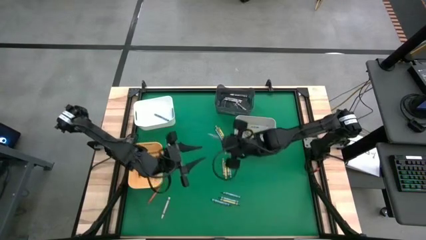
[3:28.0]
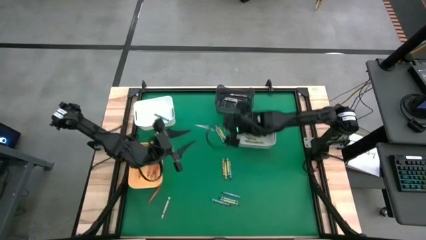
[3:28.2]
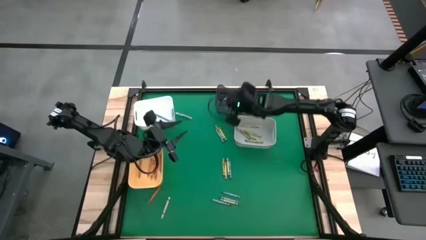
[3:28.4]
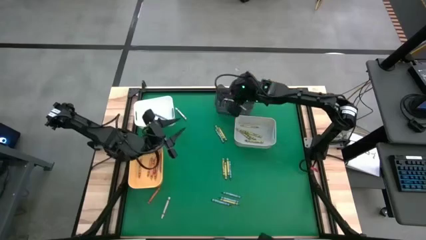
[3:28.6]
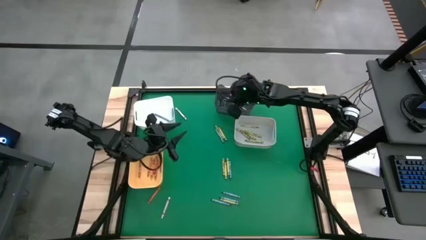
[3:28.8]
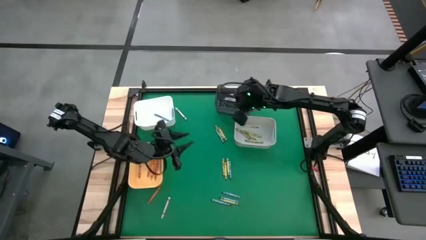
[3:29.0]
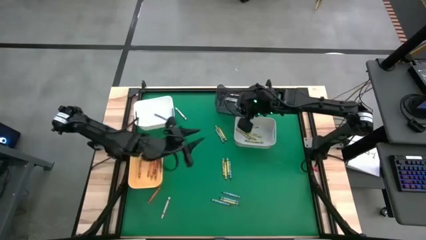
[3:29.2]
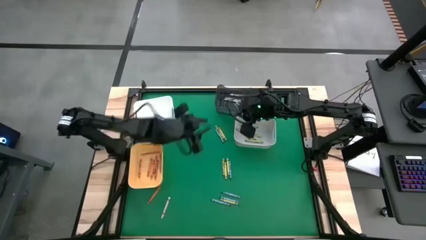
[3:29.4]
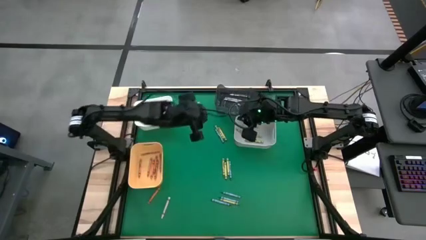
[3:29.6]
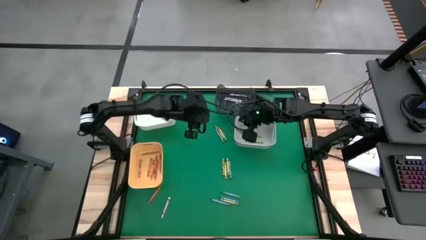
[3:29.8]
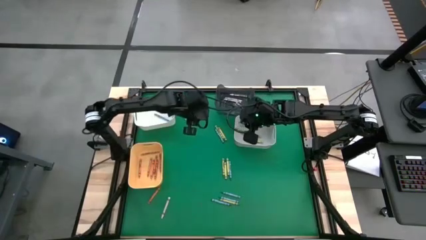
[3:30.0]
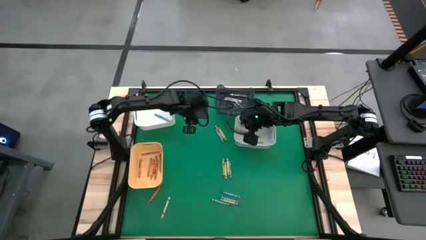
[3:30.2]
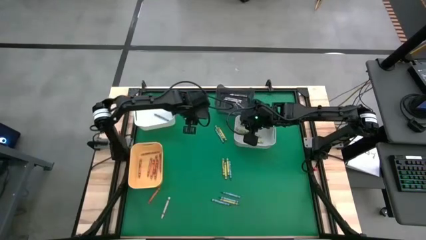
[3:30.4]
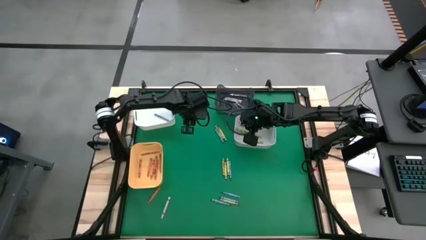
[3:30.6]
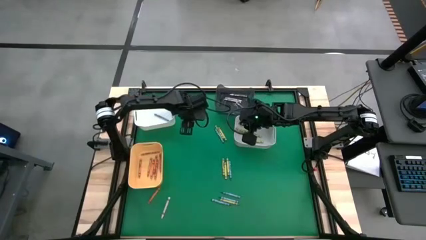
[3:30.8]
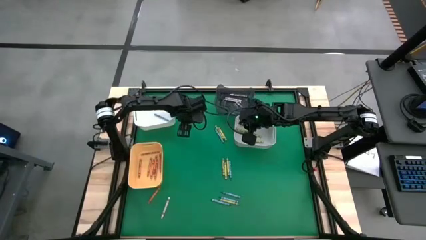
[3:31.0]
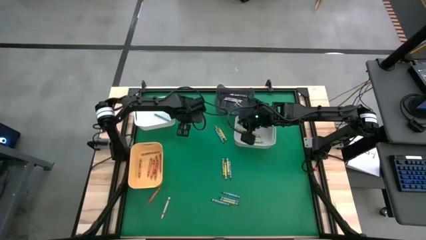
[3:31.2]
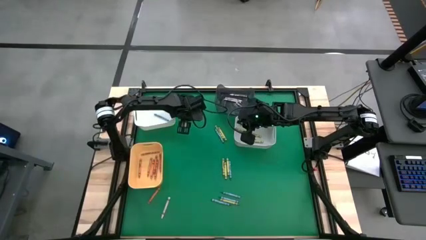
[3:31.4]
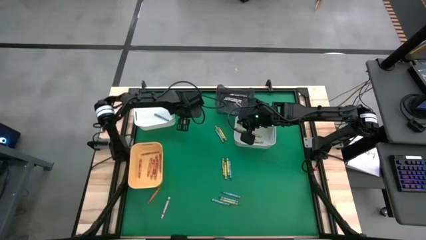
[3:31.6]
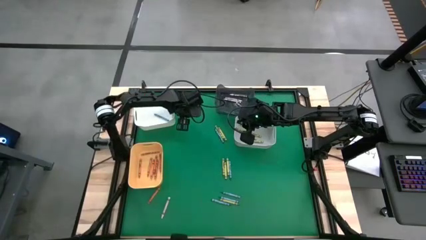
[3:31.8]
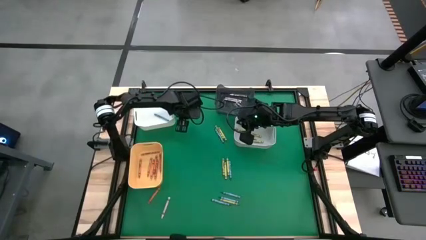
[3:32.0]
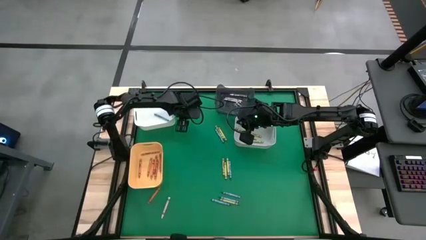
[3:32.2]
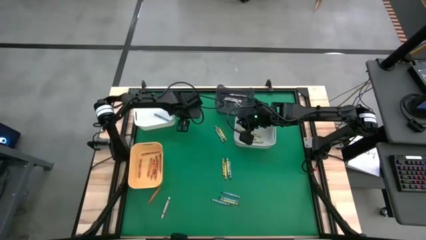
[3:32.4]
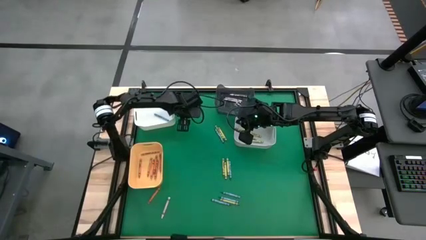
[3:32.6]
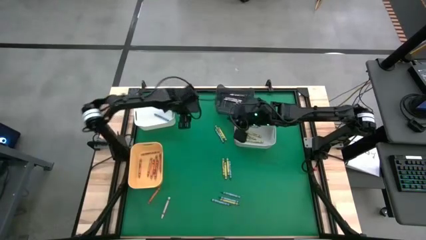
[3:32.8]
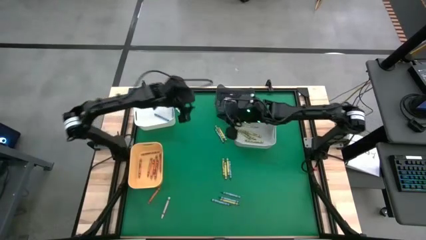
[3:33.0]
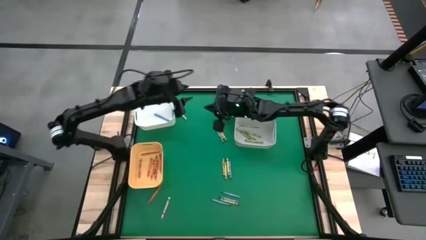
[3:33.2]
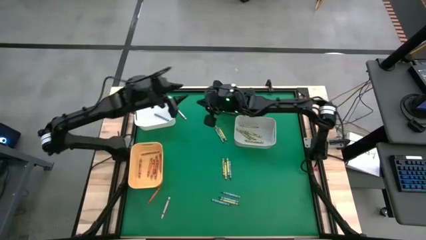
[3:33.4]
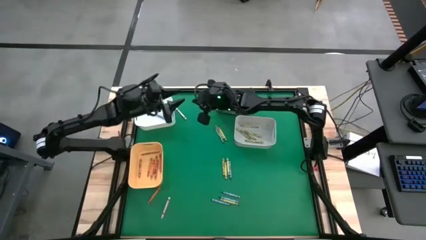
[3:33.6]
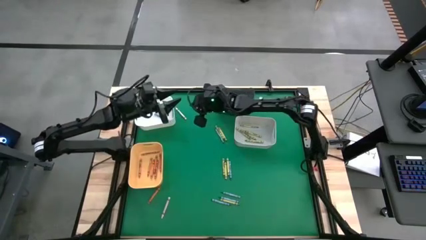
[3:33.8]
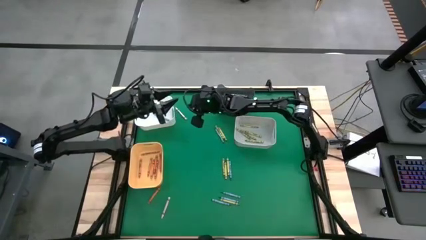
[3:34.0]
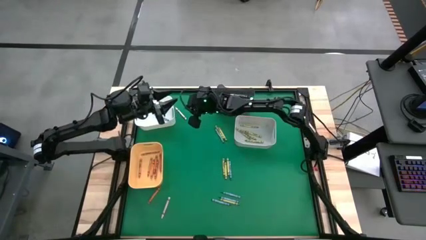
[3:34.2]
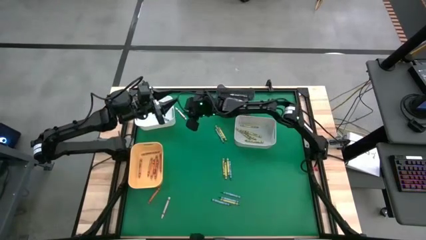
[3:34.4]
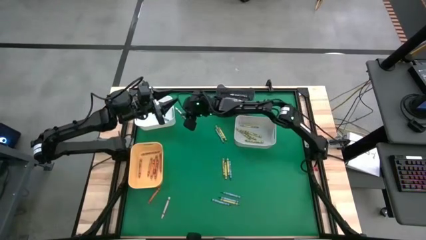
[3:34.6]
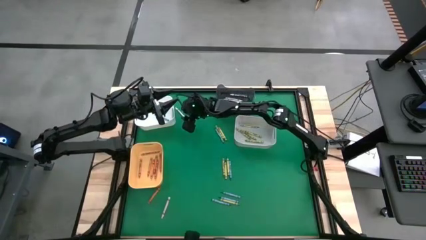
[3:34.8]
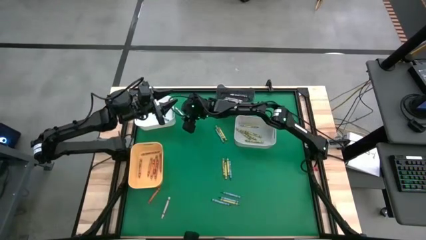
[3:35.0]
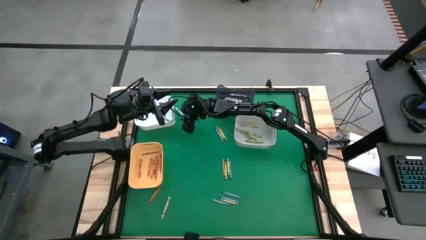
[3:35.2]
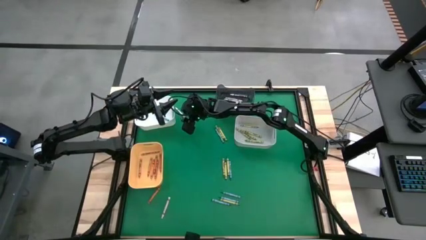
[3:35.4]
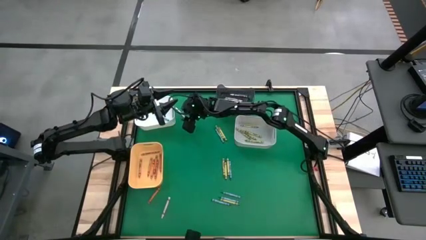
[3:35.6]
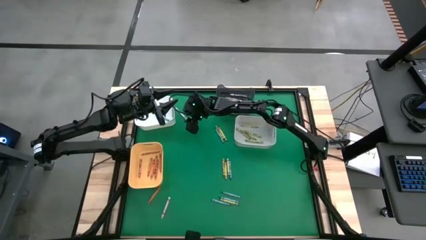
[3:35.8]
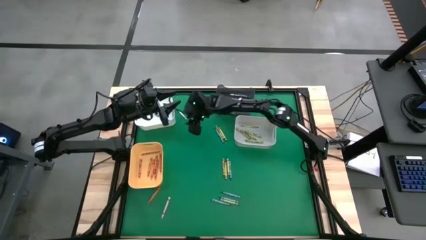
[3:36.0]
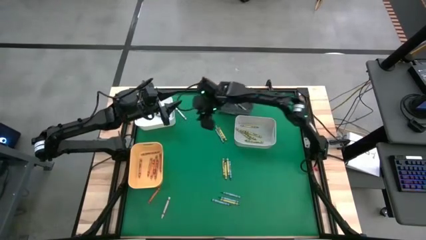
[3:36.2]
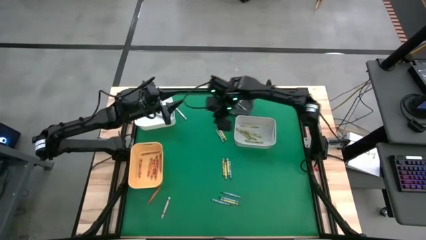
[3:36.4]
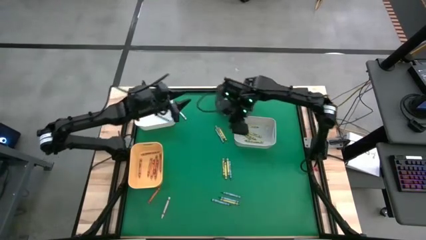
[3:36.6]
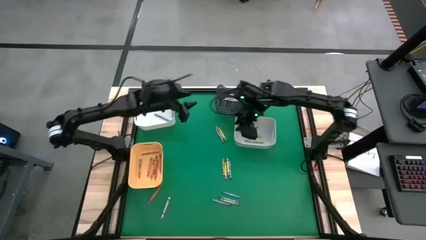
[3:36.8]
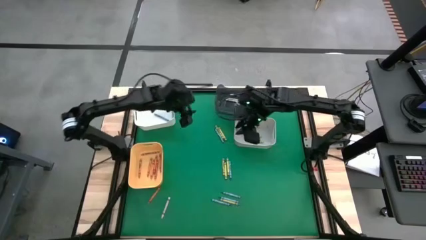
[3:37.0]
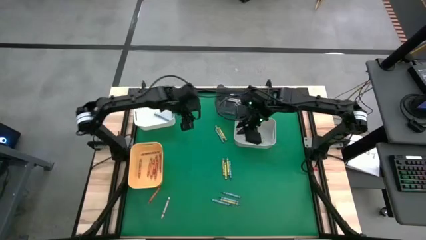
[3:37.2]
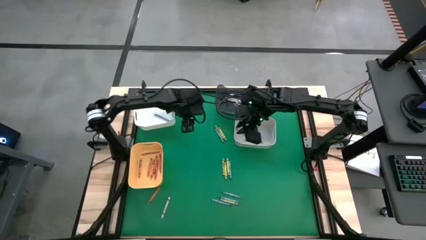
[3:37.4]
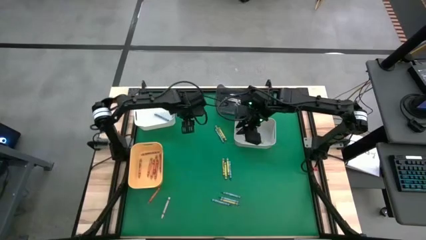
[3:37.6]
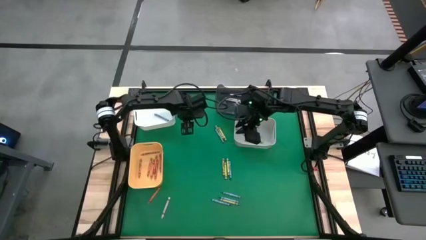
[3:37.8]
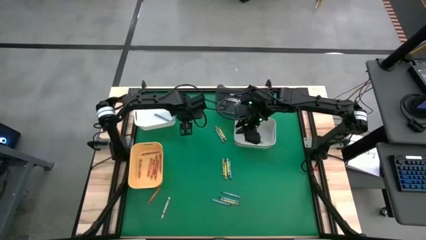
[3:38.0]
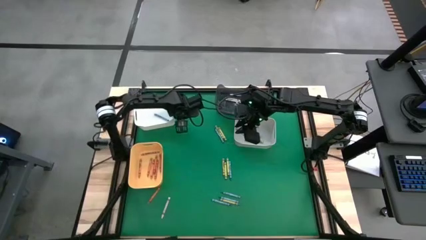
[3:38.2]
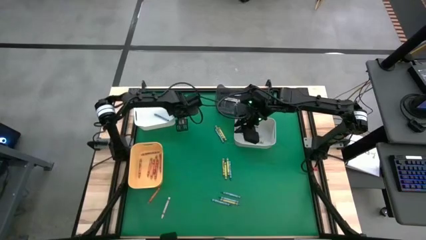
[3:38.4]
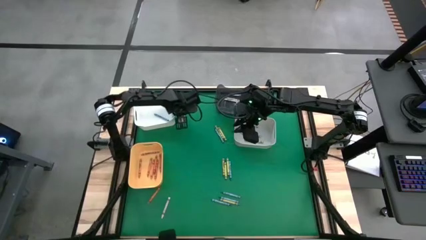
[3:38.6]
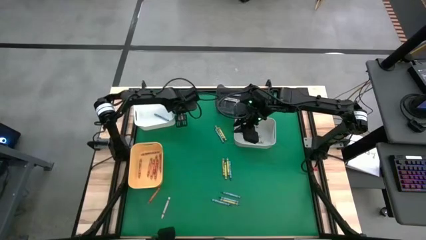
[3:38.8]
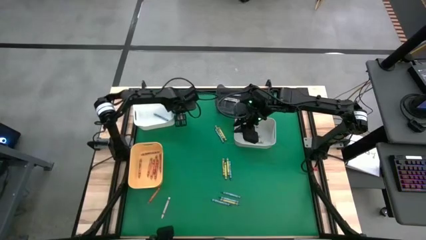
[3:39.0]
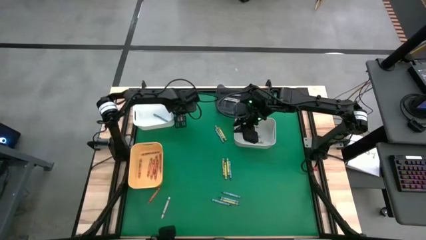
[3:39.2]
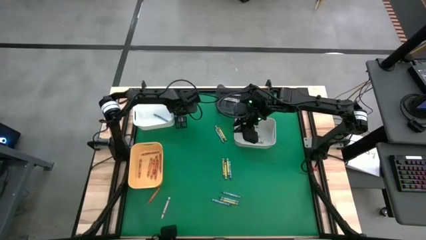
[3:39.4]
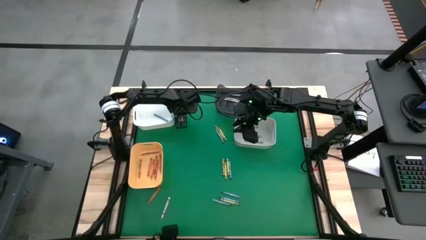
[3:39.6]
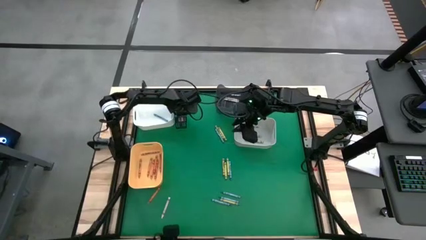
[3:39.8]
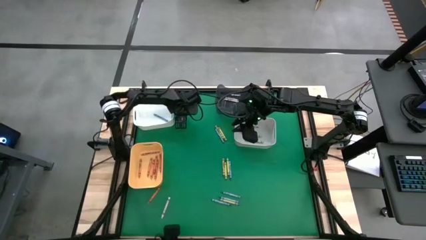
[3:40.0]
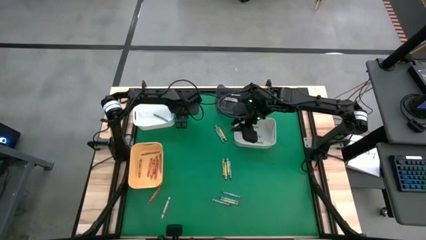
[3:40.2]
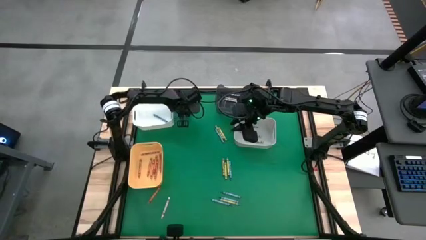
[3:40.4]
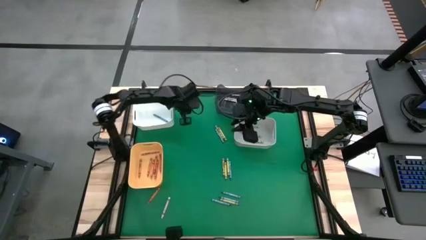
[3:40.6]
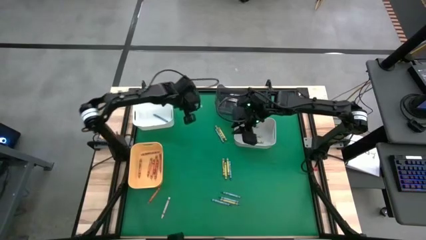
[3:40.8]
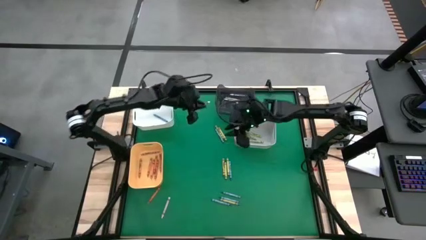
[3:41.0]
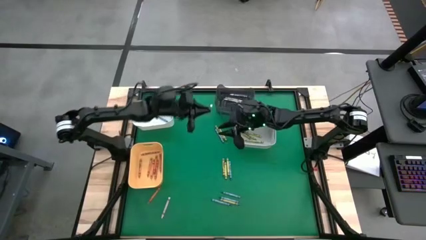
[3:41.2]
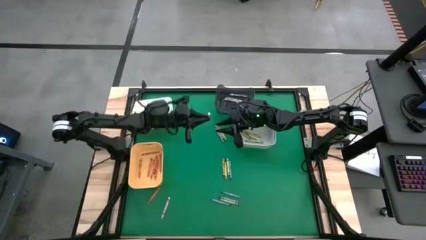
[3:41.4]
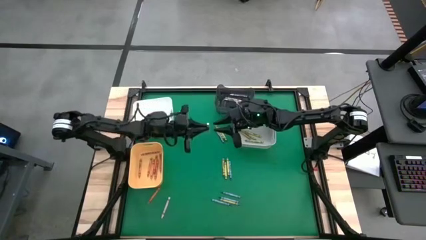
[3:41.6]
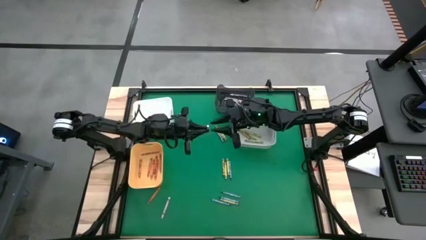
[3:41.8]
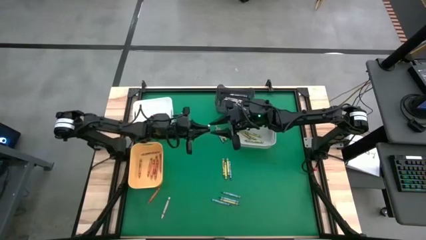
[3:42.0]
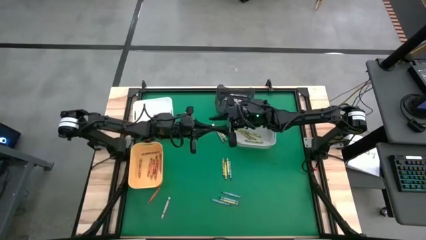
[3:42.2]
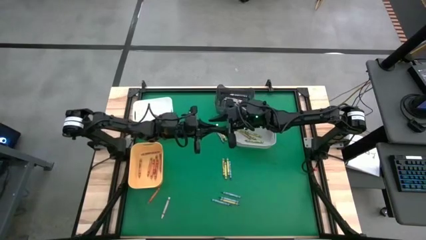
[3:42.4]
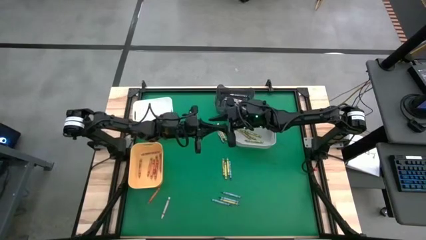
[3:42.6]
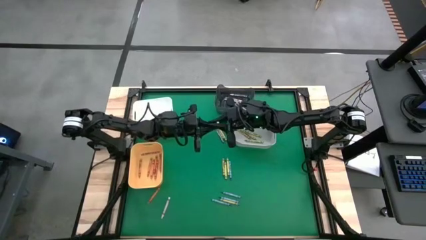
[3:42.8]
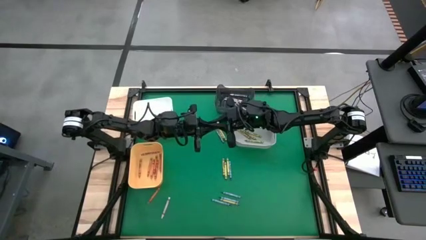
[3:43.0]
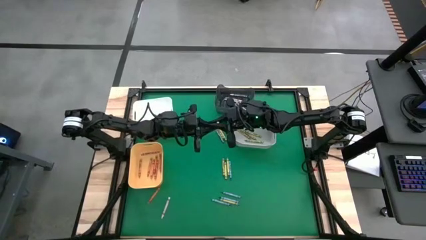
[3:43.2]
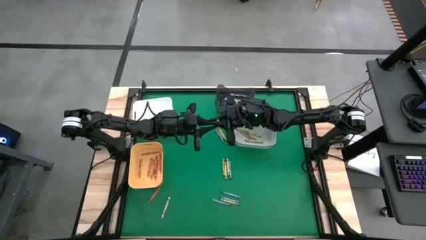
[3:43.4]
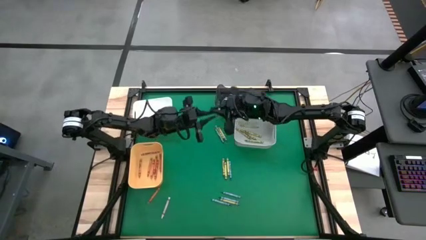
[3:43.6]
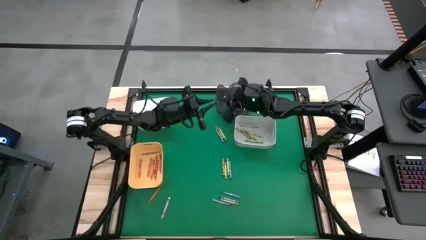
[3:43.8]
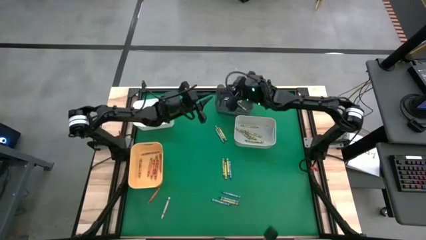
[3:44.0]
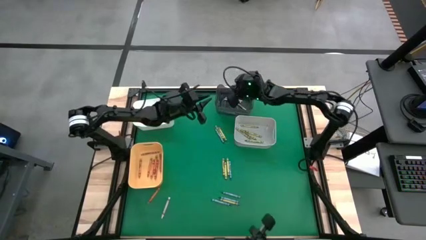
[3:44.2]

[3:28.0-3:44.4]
Task: Sort crayons
Put the white crayon into the black bin
